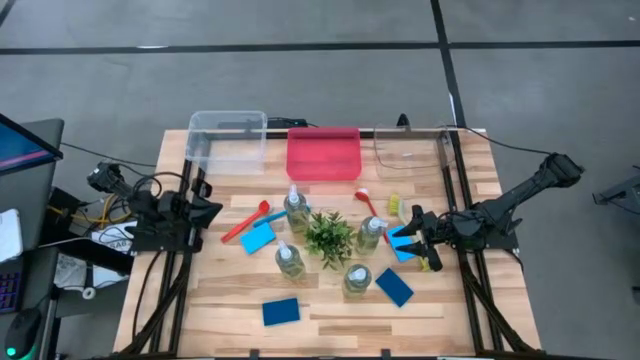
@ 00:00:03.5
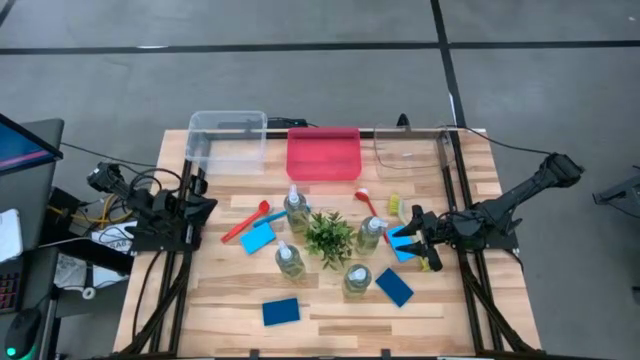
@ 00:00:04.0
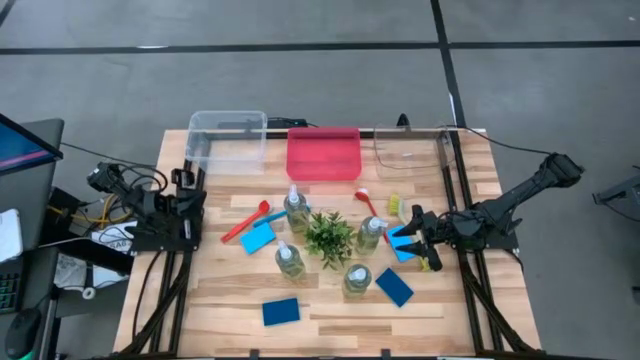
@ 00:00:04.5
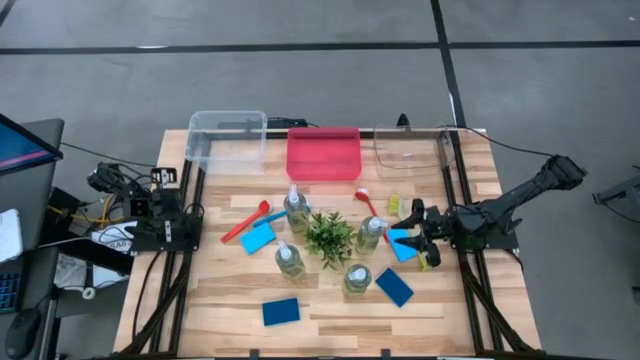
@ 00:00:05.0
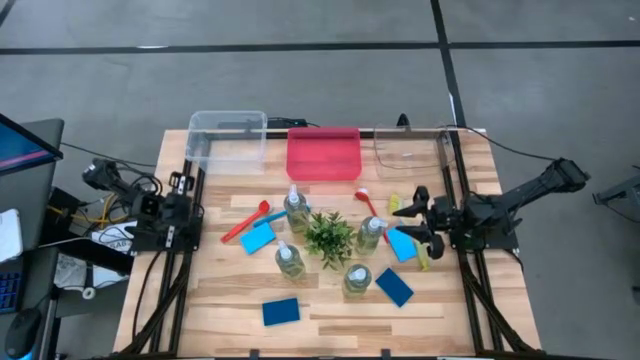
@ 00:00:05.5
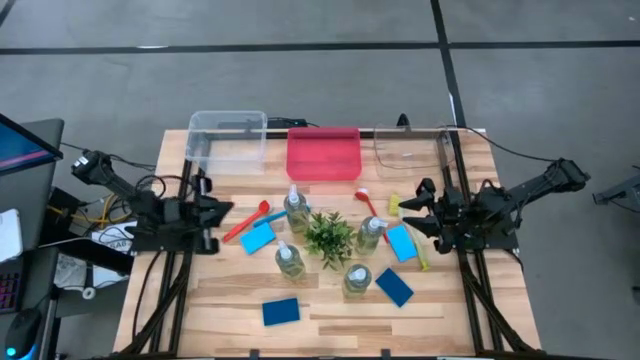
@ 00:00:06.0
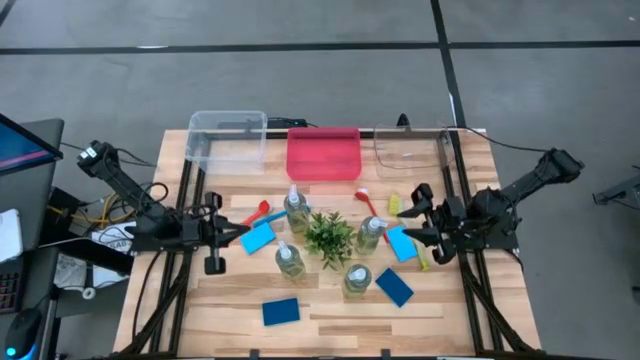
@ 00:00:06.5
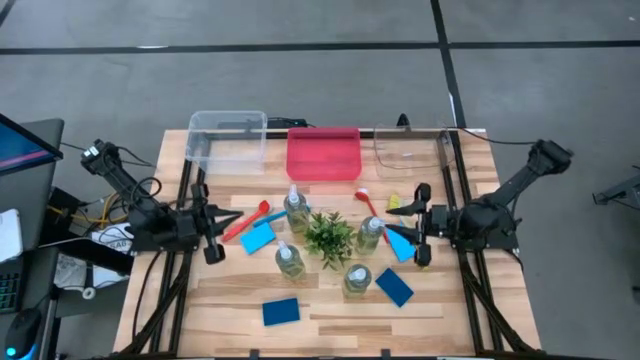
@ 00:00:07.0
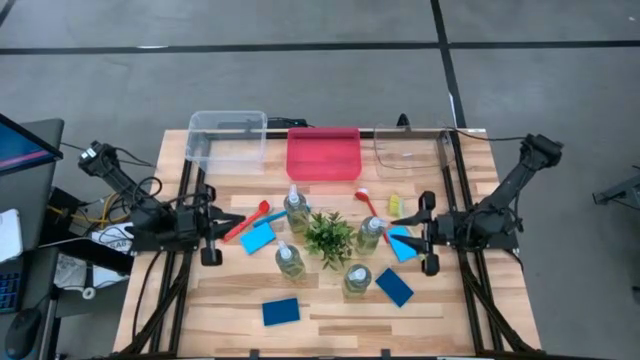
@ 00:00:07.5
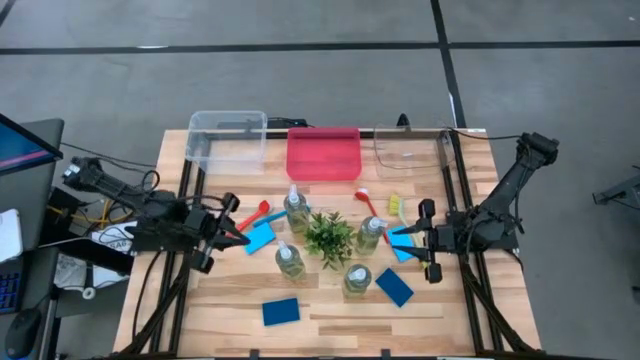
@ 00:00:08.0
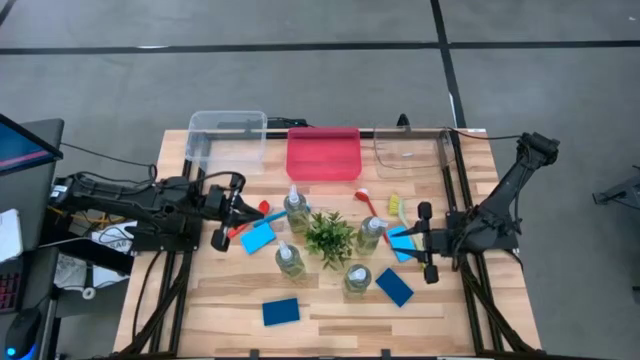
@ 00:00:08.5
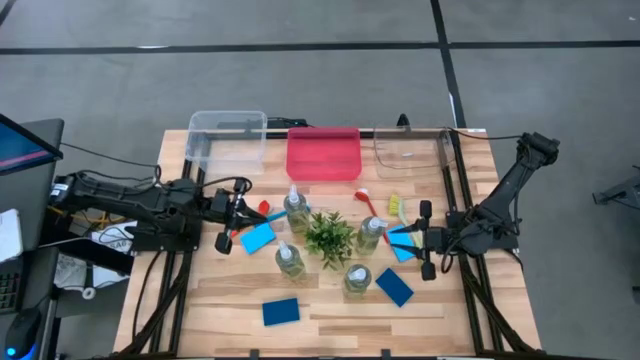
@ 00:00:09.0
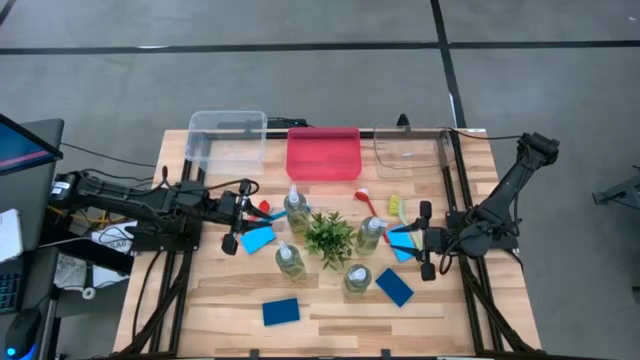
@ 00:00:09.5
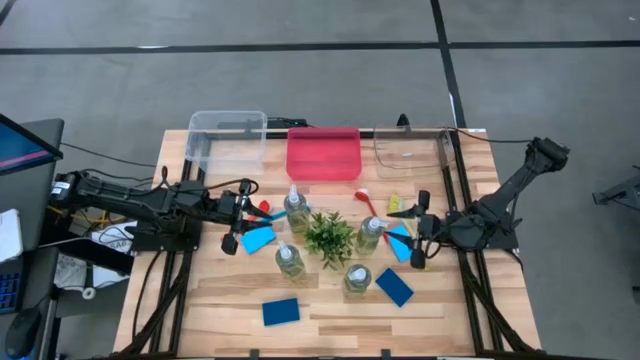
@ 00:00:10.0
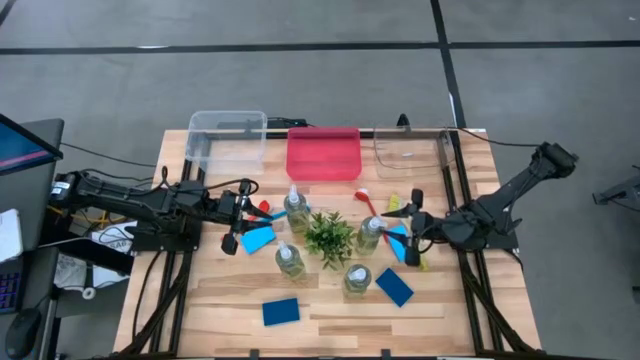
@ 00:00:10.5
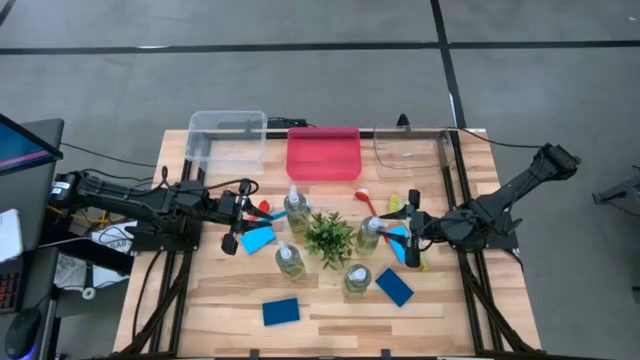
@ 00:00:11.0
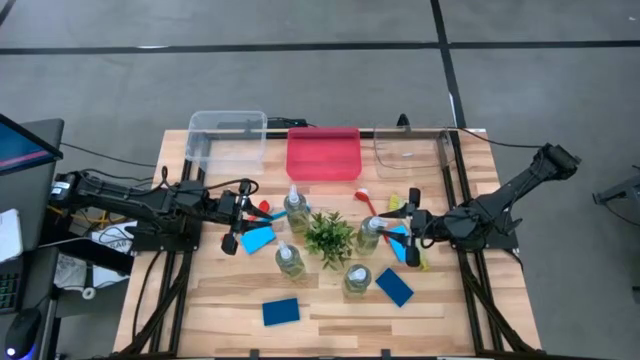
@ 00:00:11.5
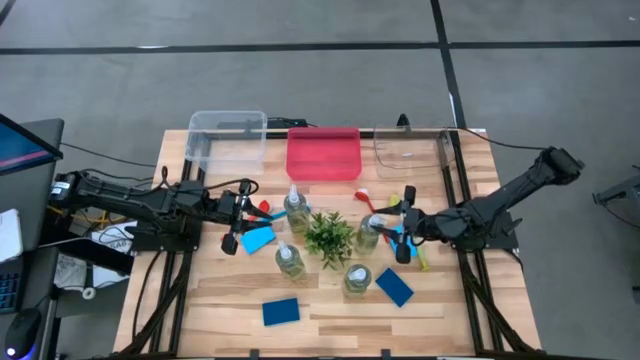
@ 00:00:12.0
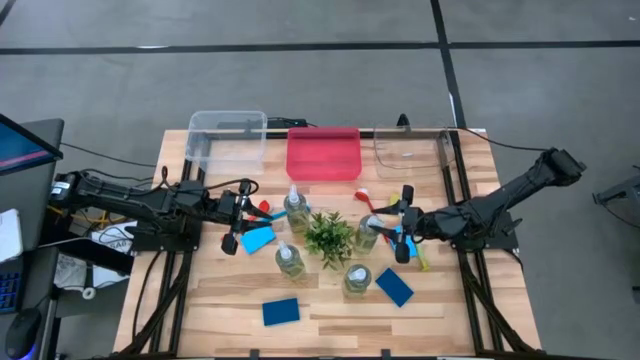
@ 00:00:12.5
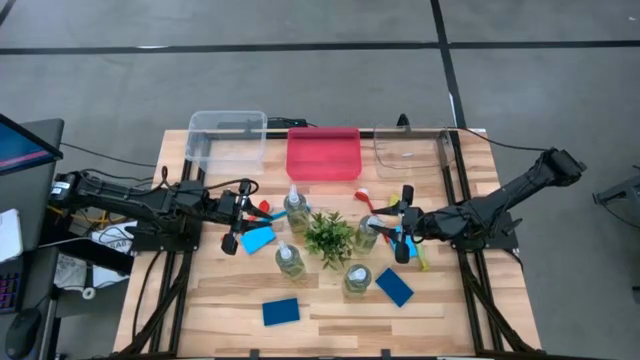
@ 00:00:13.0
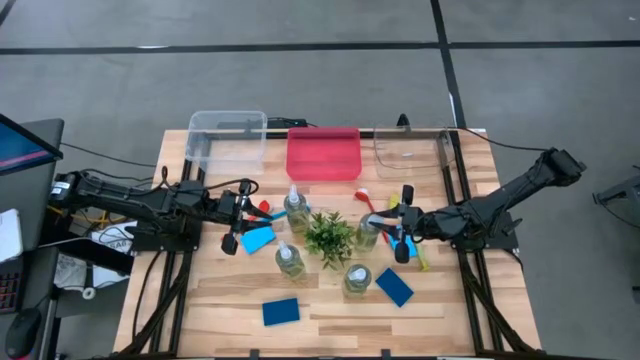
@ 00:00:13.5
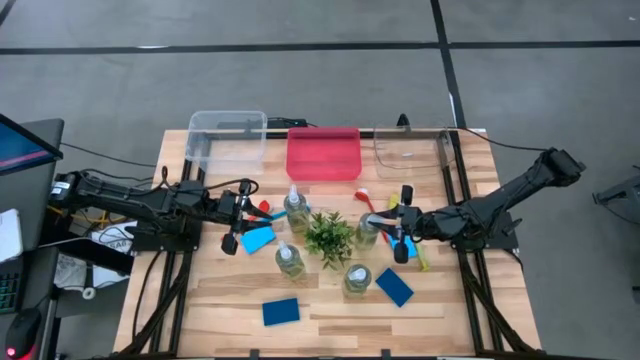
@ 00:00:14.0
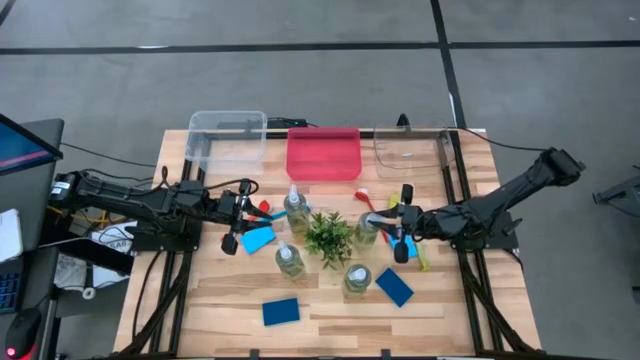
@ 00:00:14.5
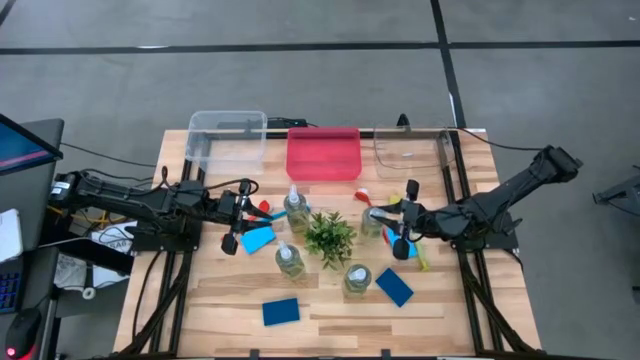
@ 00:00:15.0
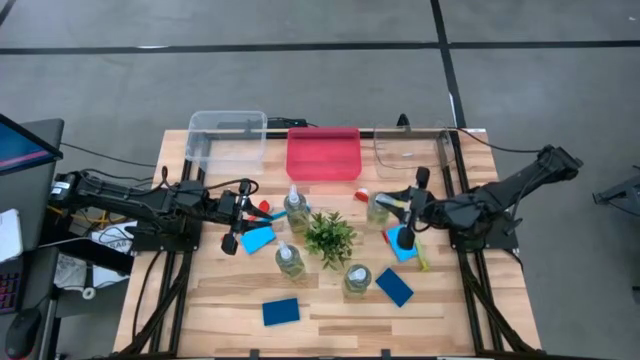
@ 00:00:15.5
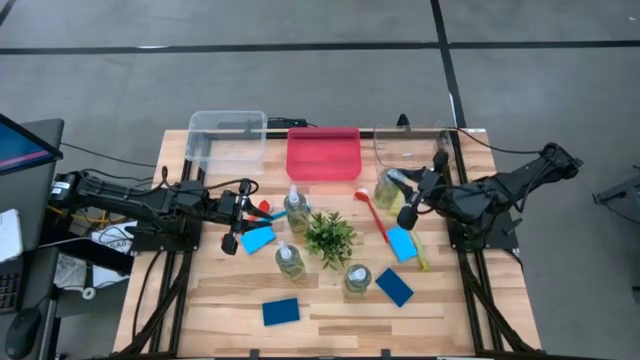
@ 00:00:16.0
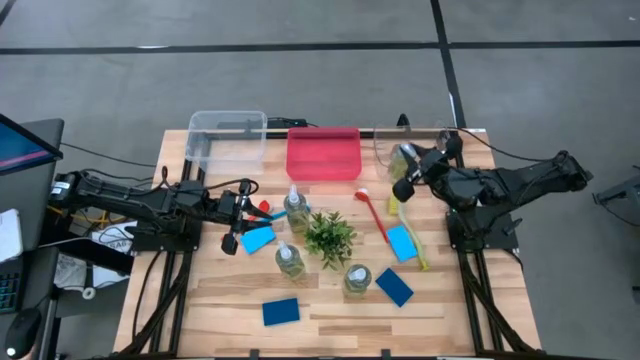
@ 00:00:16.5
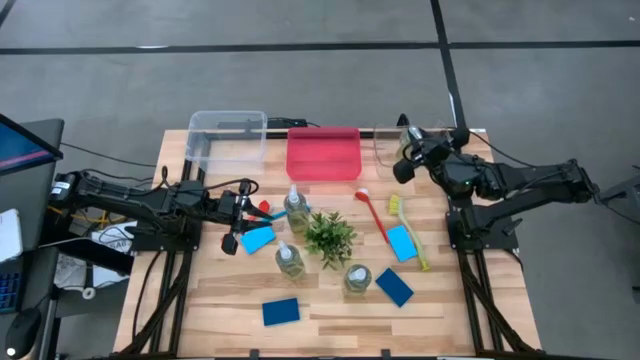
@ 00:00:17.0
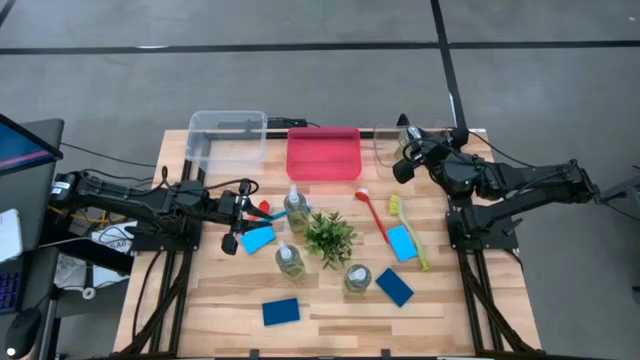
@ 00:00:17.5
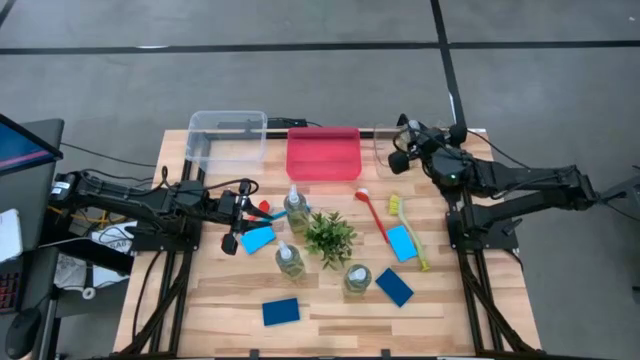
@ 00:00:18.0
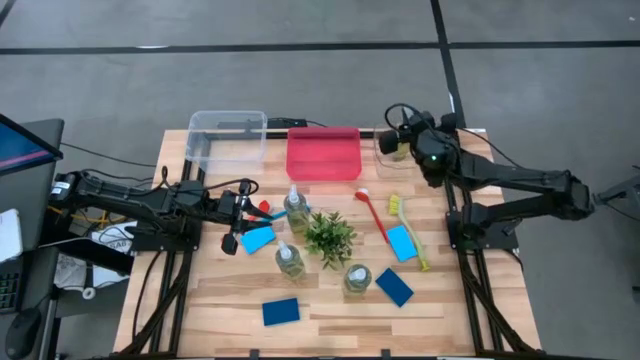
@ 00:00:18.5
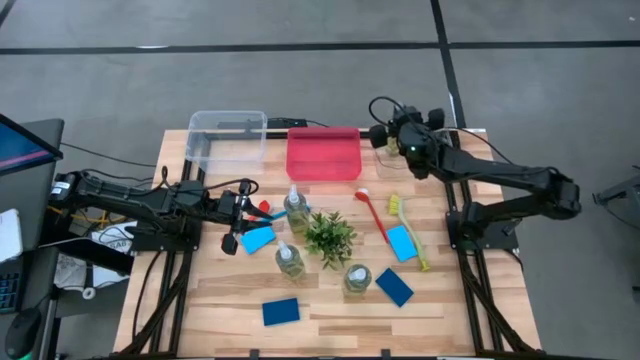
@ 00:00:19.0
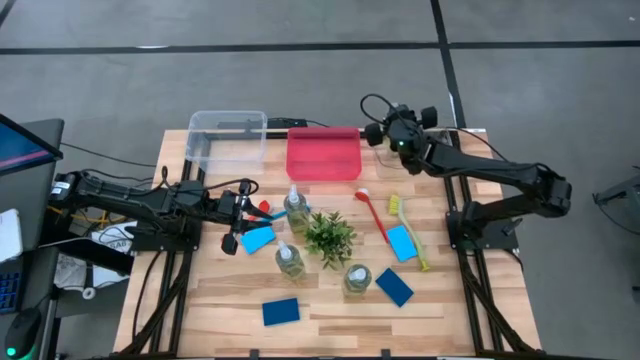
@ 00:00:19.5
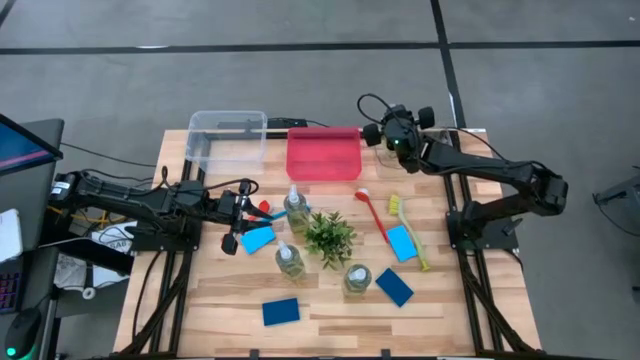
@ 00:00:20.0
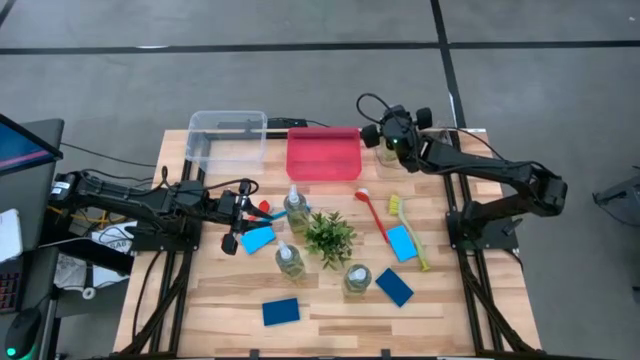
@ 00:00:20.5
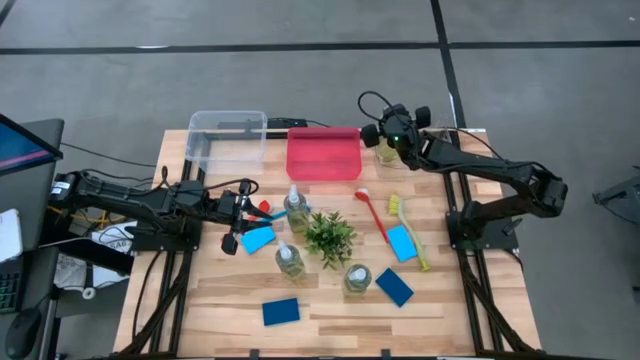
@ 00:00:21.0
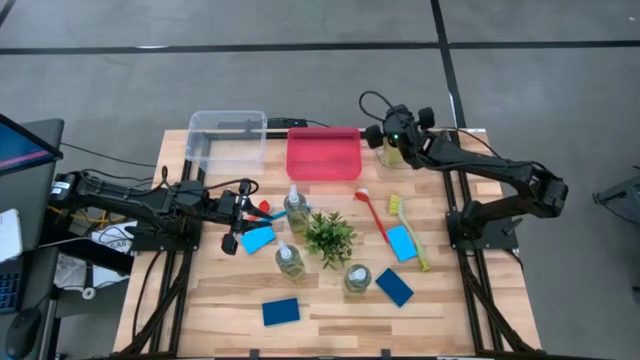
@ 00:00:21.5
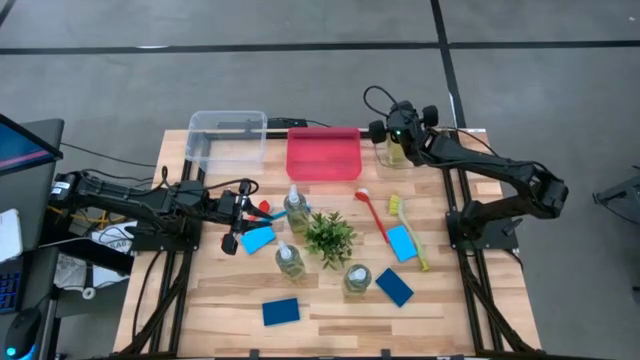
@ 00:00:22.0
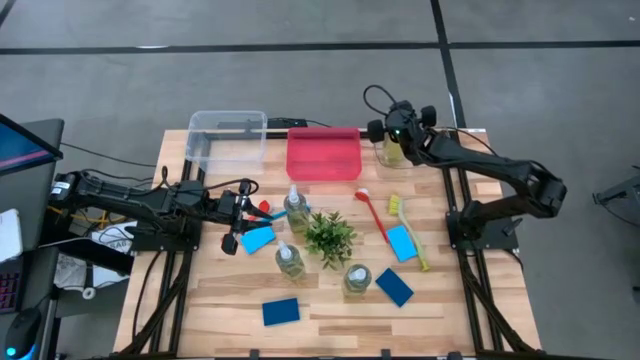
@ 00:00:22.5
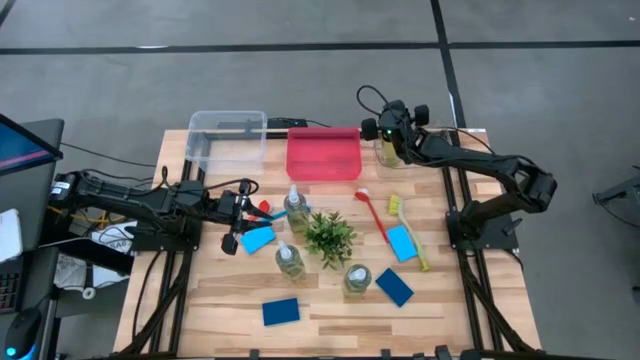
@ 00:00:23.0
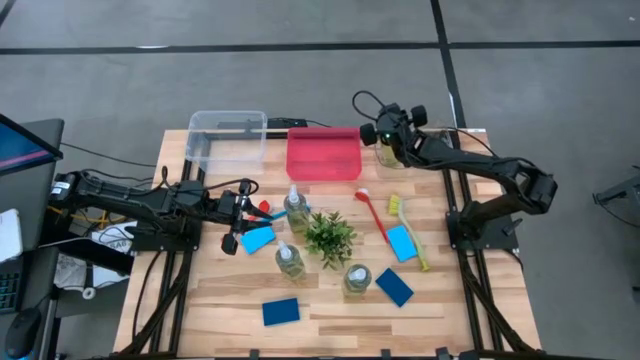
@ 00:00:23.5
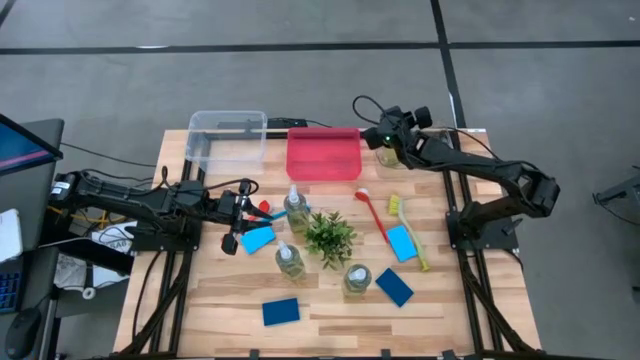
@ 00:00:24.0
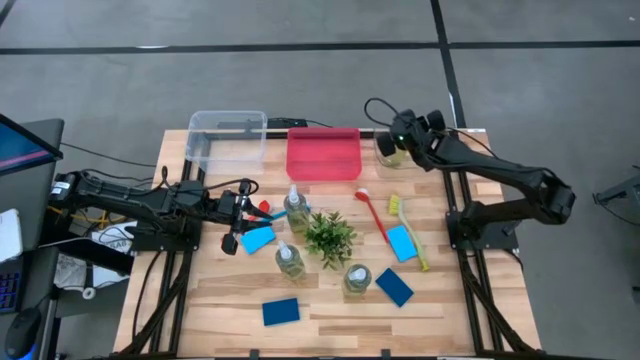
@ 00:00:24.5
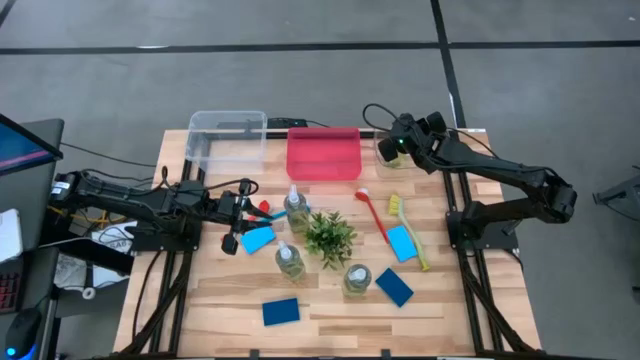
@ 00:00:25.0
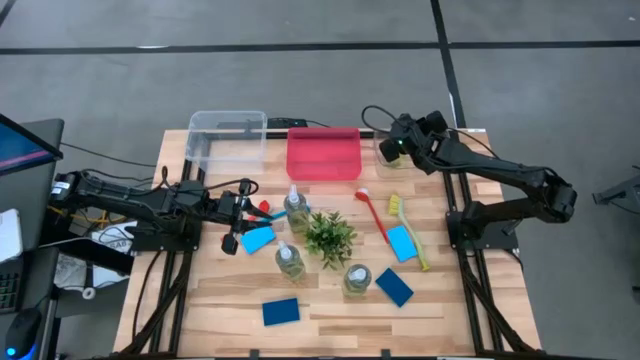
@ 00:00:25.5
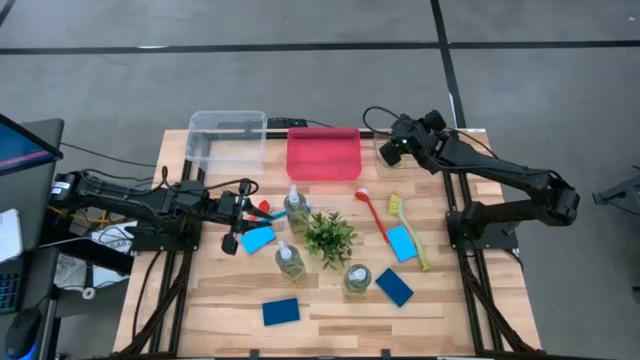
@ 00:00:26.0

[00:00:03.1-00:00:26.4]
Task: Pick & Place Kitchen Sink Supplies
Put the green dishwashing liquid dispenser into the right transparent bin
